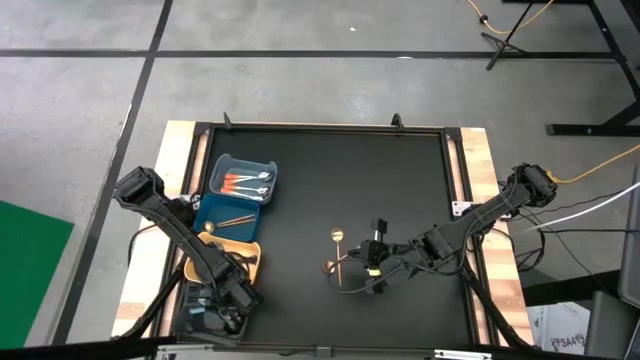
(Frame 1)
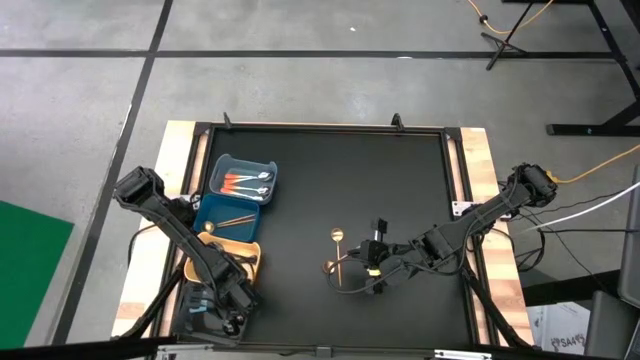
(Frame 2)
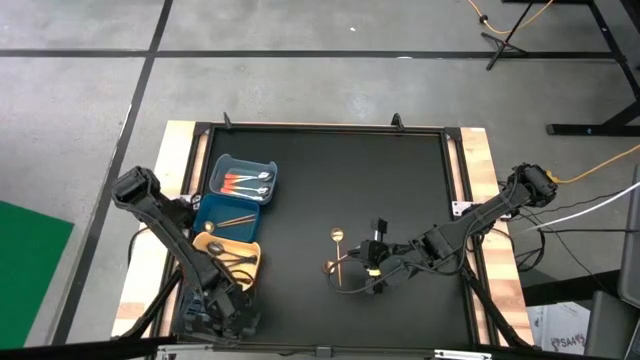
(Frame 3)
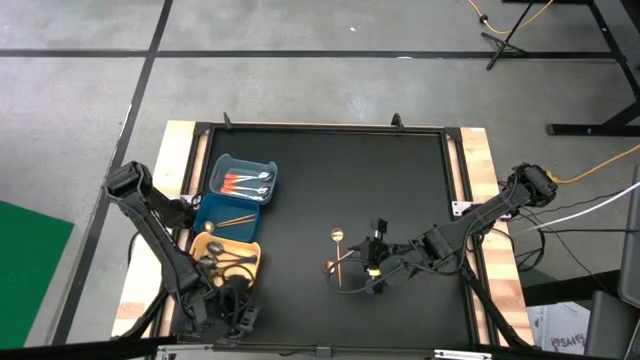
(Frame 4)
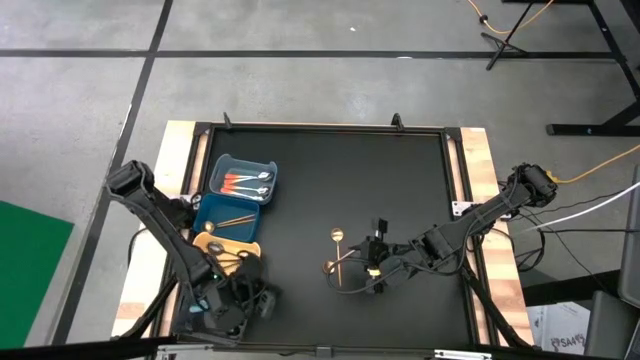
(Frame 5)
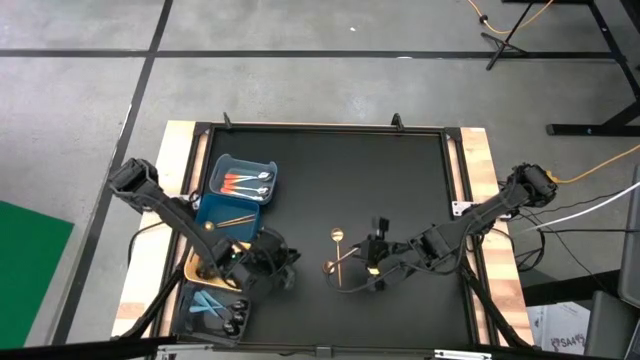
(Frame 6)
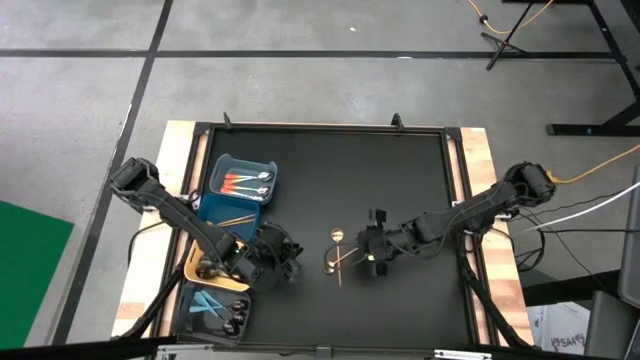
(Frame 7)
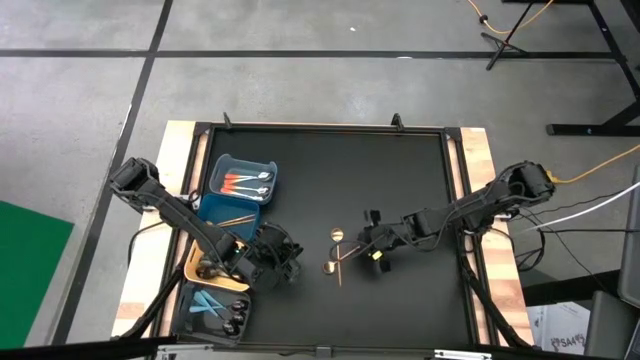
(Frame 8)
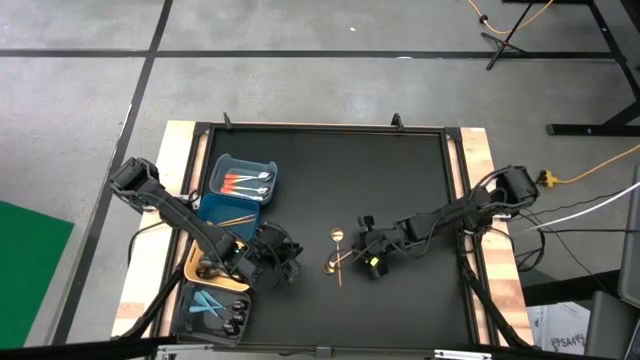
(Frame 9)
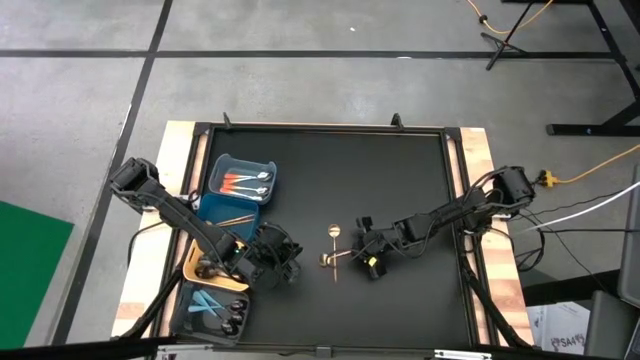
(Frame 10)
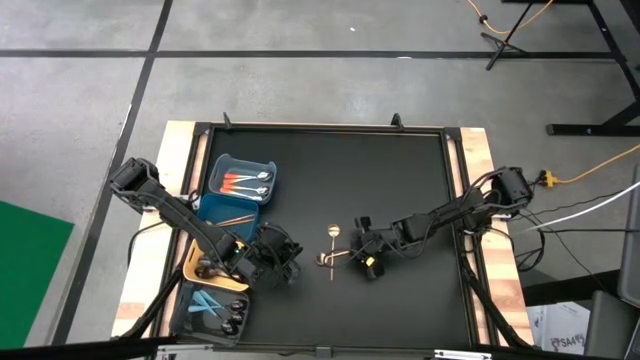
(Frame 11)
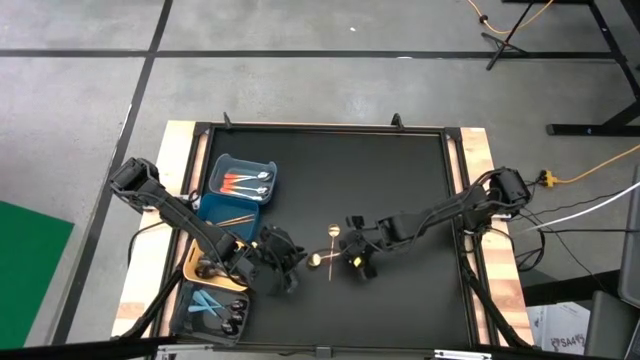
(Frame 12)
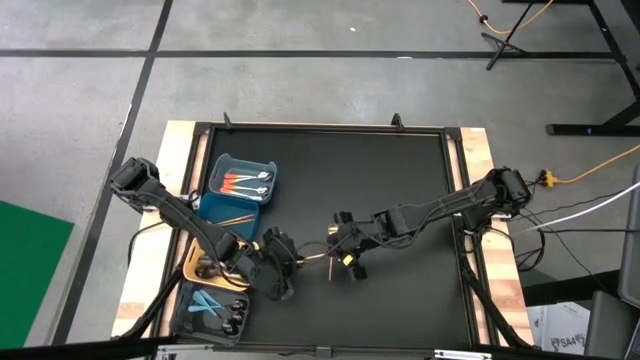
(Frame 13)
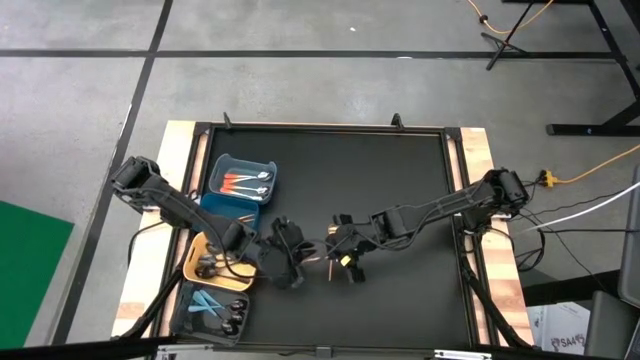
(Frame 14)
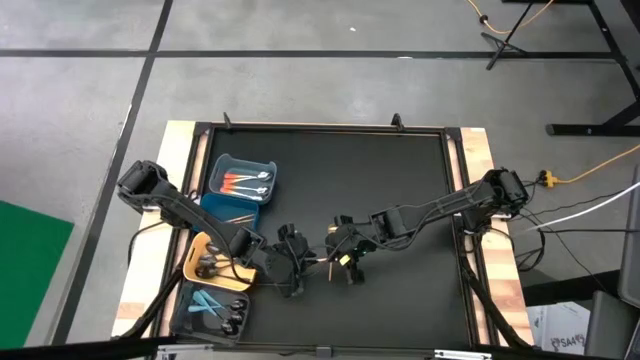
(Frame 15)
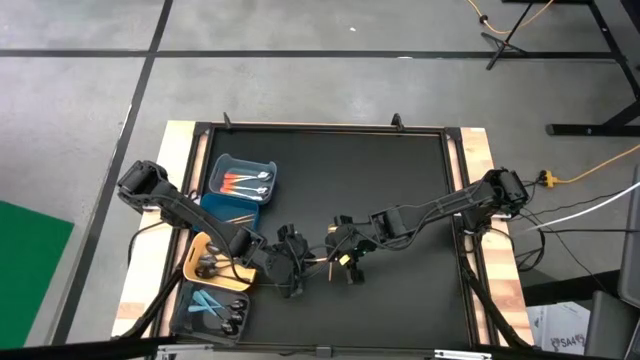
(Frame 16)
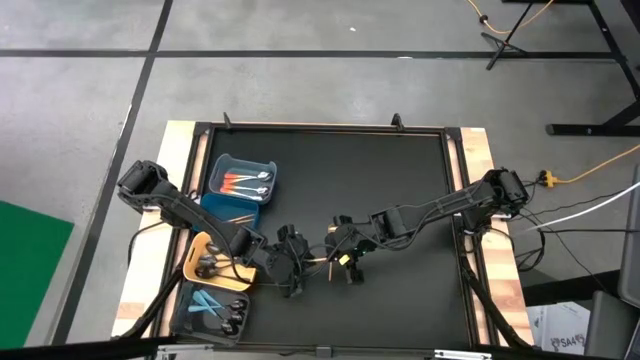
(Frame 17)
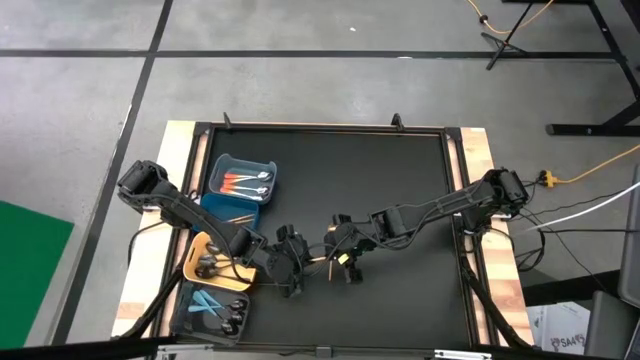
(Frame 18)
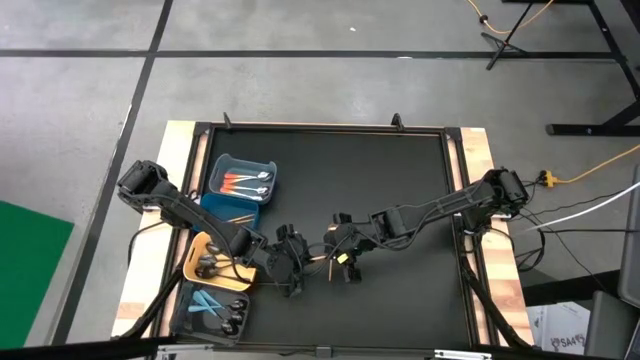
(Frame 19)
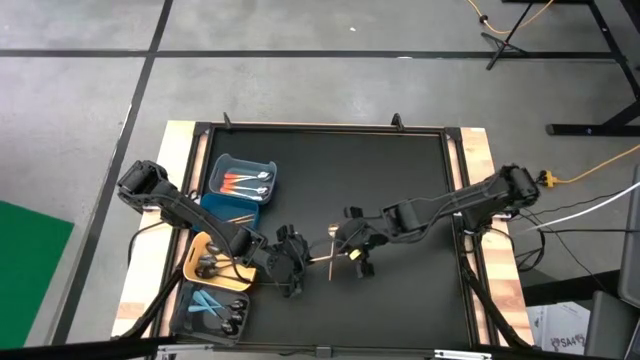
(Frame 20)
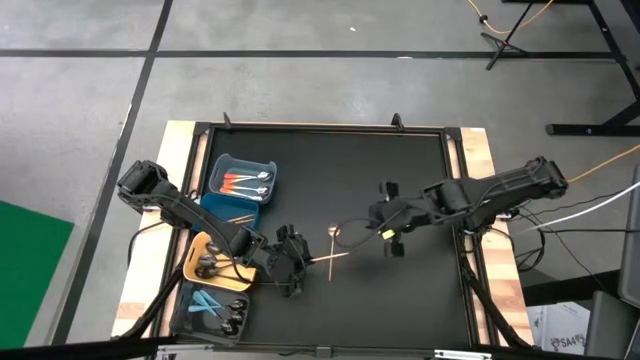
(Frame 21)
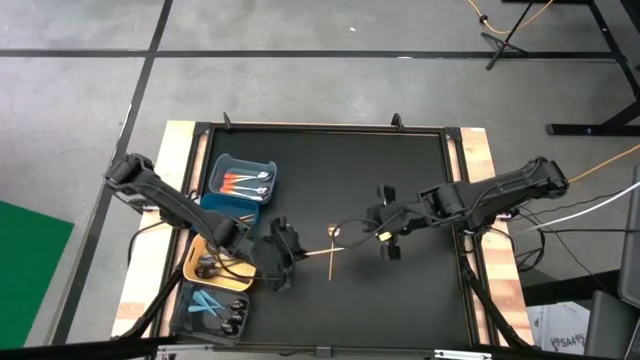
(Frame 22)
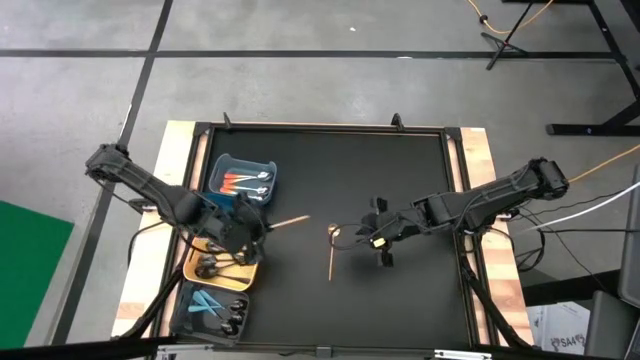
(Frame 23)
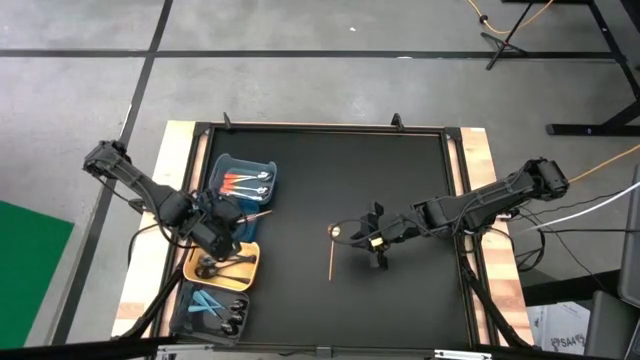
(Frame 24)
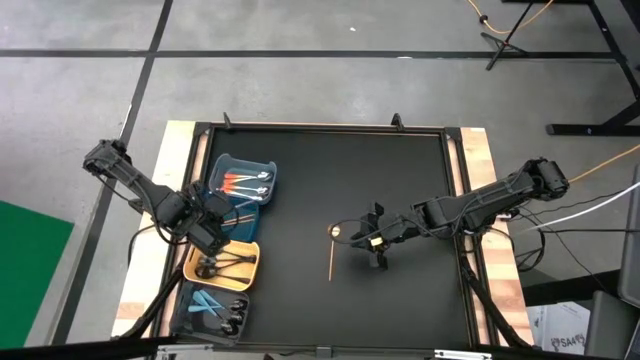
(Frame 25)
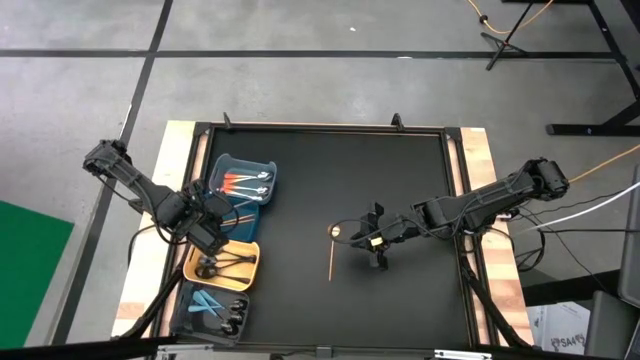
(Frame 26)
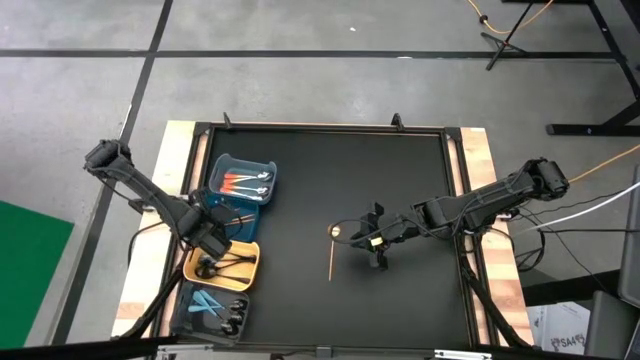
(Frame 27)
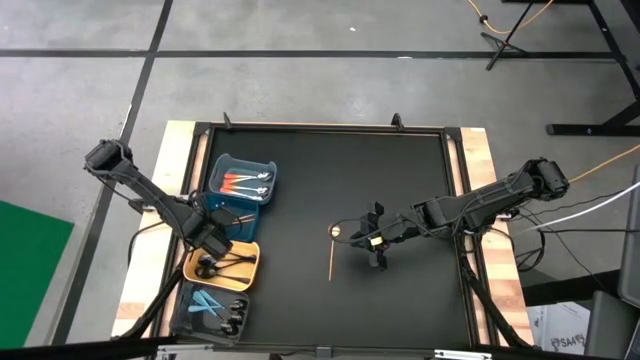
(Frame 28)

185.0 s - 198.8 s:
Task: Sort silverware by color (type)
Put the gold spoon into the blue bin

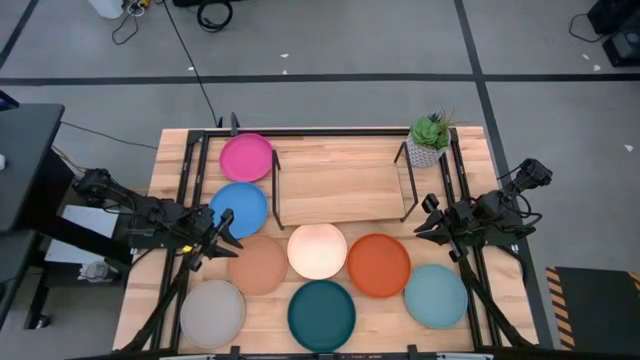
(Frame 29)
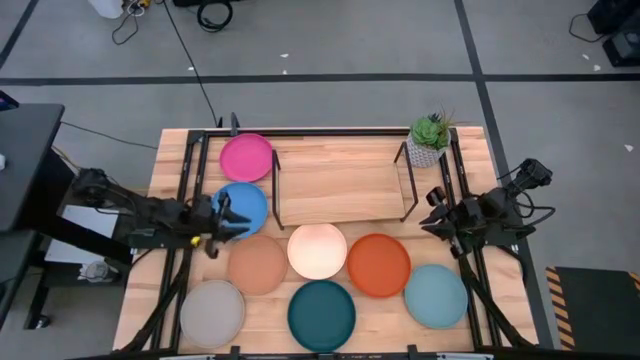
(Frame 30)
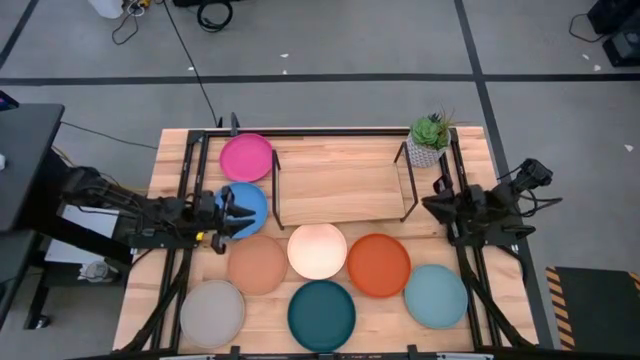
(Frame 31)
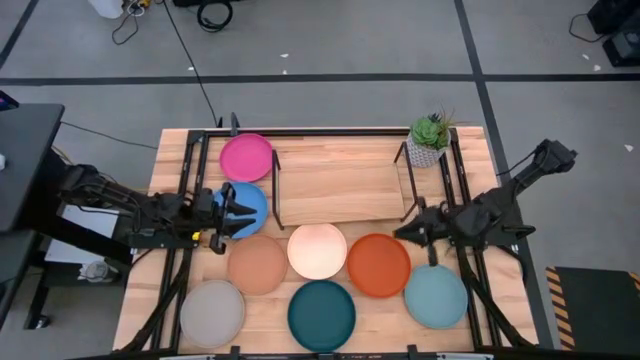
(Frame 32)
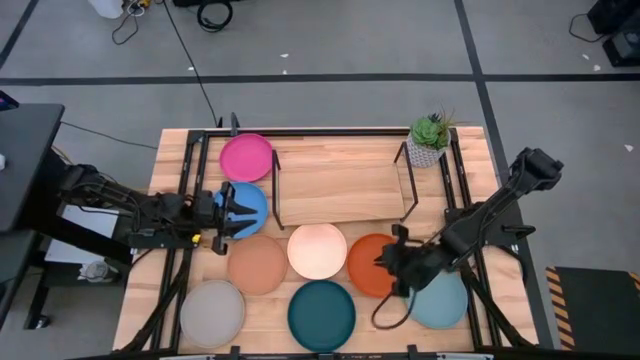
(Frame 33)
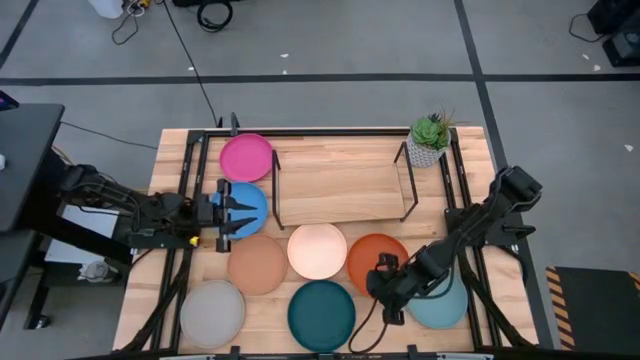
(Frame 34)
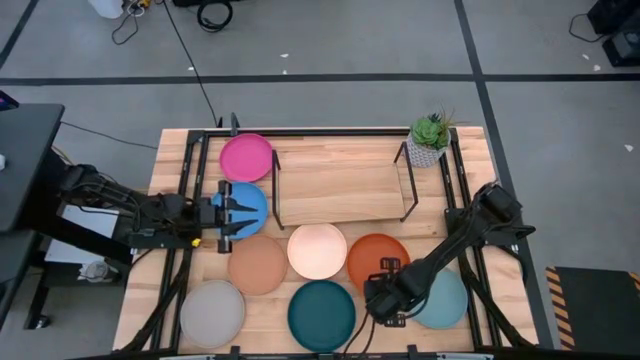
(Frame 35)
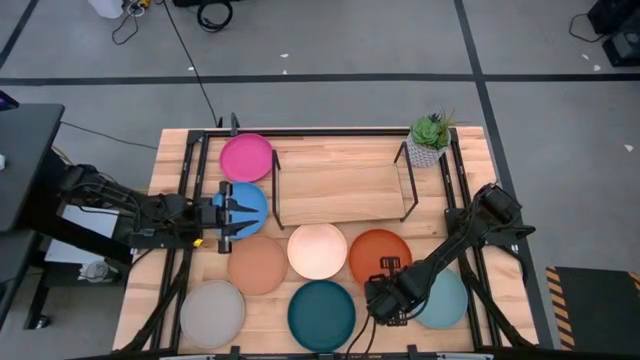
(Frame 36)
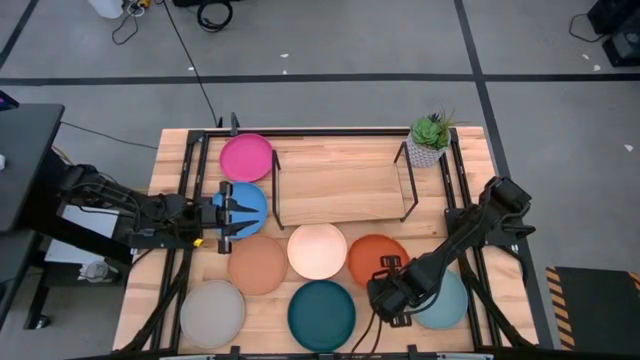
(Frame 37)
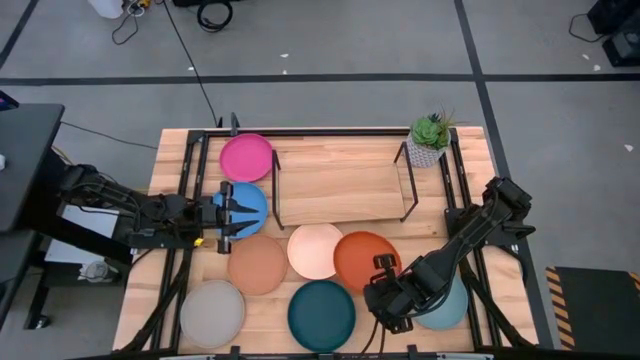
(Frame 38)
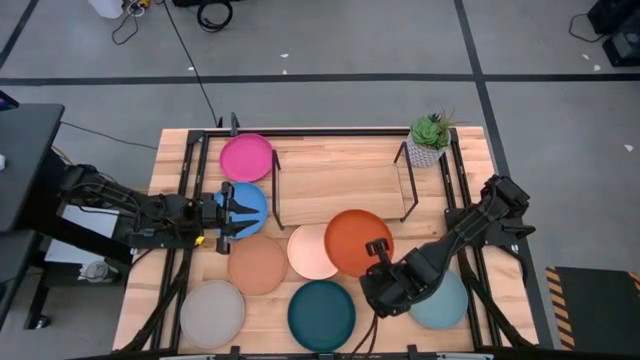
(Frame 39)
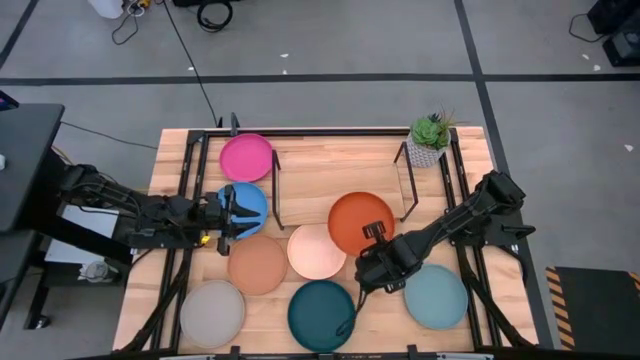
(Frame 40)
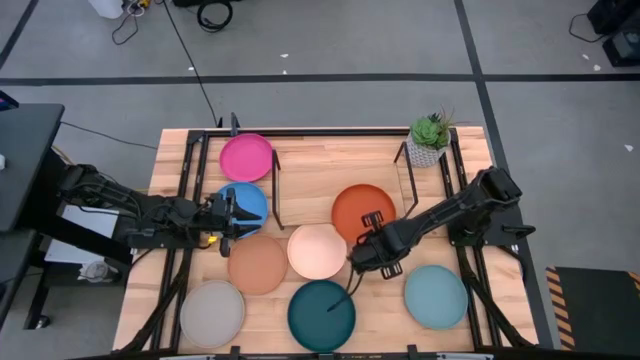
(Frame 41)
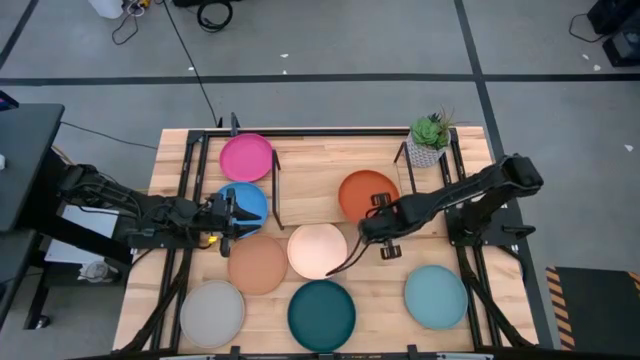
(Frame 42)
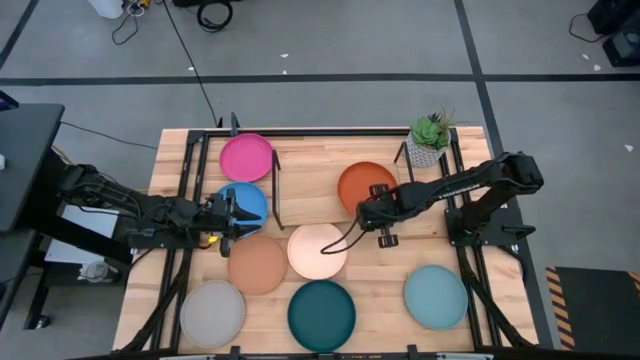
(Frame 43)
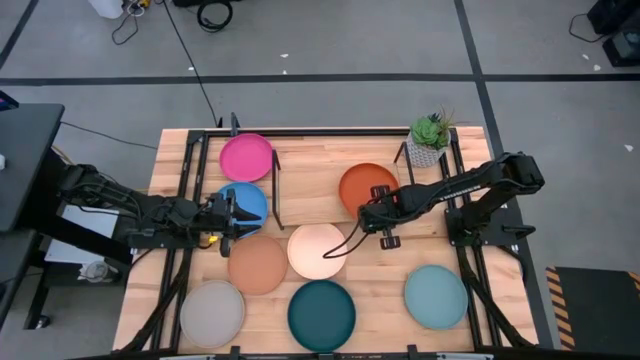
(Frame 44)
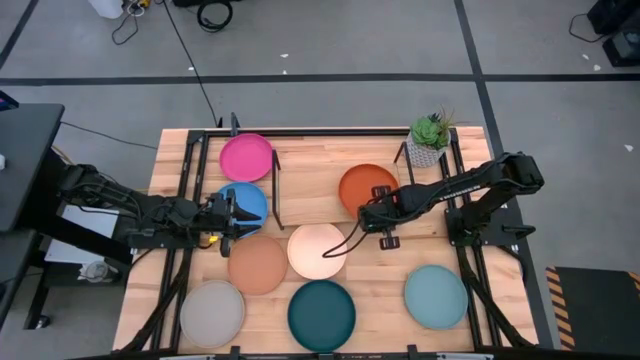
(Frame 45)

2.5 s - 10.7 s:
Task: Place and stack plates onto a shelf
Put the orange plate on the shelf
